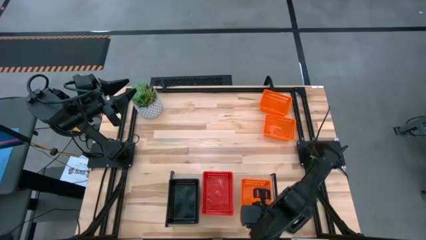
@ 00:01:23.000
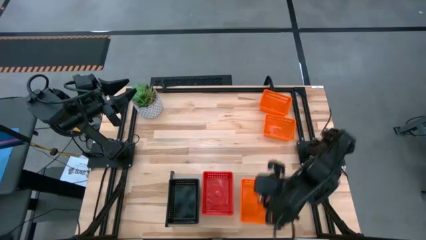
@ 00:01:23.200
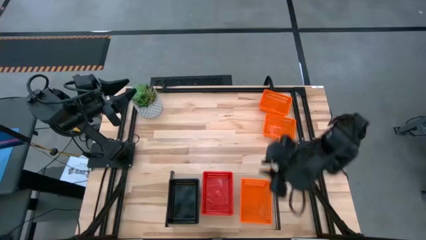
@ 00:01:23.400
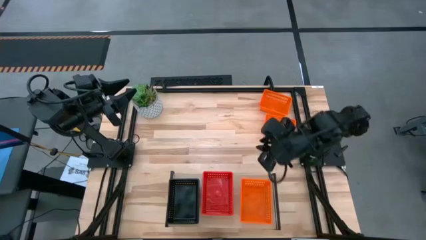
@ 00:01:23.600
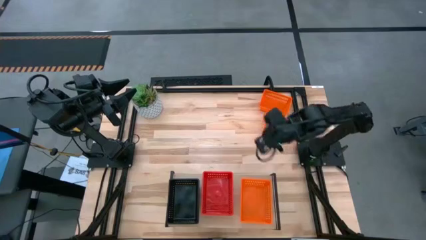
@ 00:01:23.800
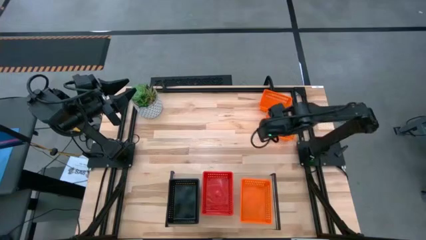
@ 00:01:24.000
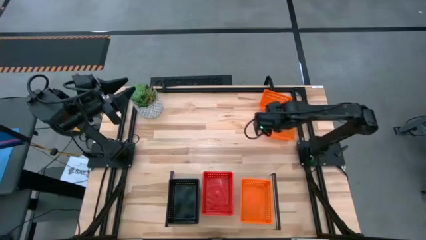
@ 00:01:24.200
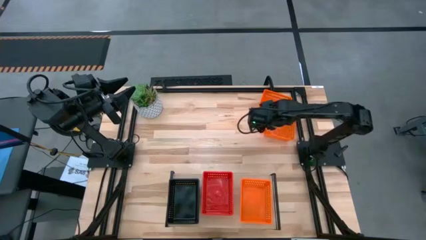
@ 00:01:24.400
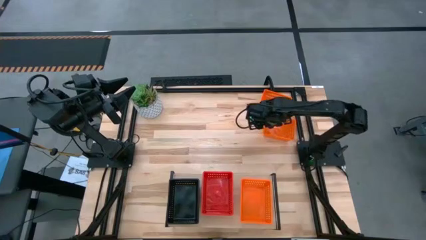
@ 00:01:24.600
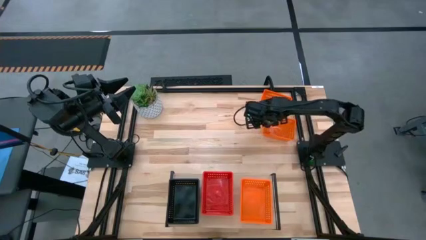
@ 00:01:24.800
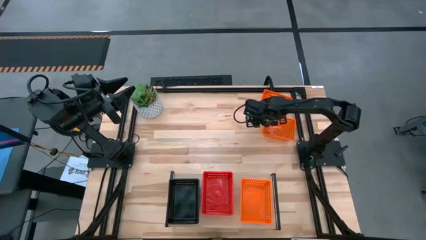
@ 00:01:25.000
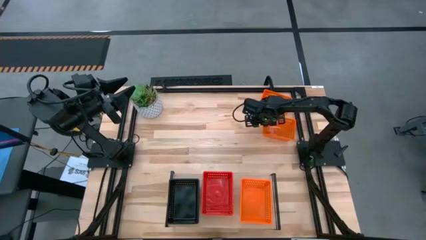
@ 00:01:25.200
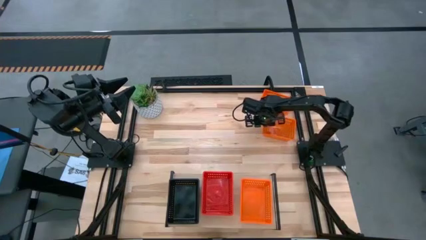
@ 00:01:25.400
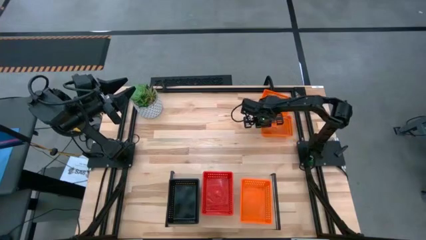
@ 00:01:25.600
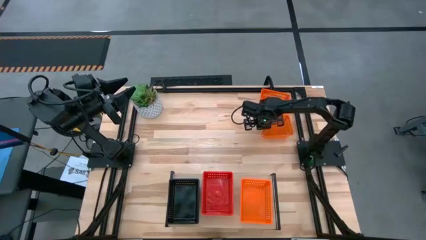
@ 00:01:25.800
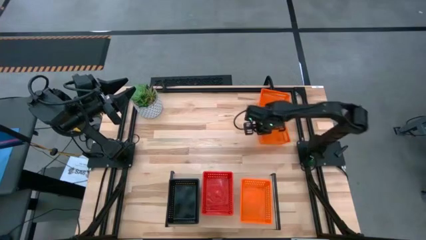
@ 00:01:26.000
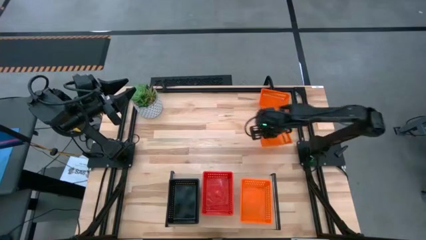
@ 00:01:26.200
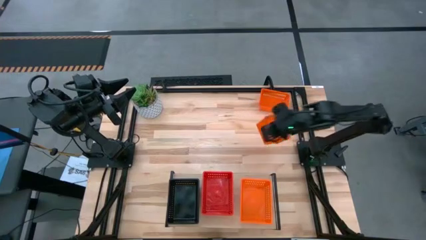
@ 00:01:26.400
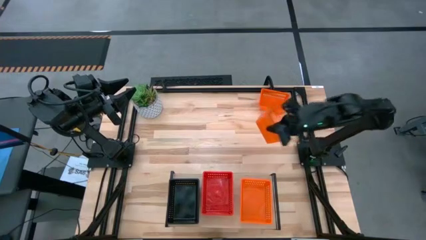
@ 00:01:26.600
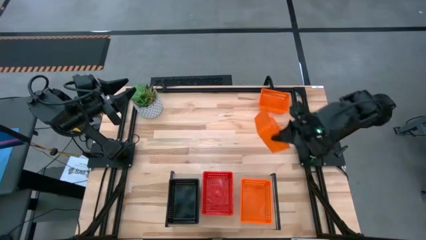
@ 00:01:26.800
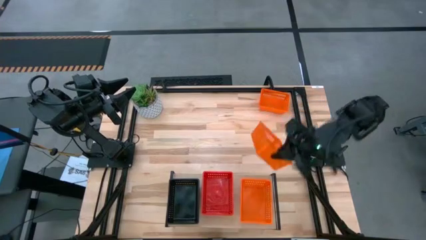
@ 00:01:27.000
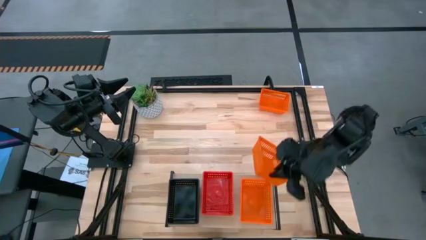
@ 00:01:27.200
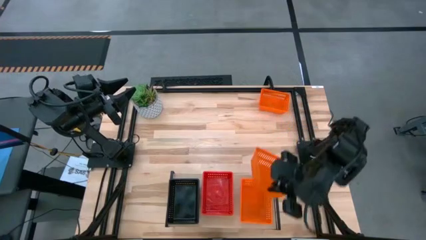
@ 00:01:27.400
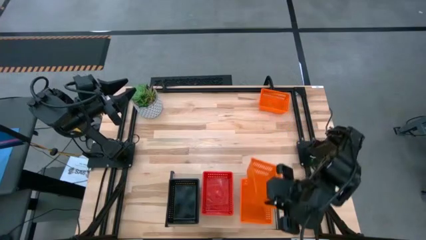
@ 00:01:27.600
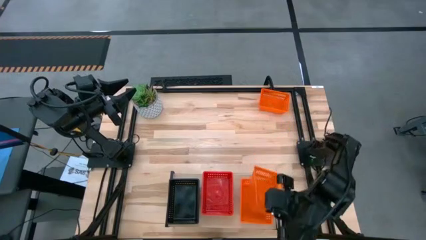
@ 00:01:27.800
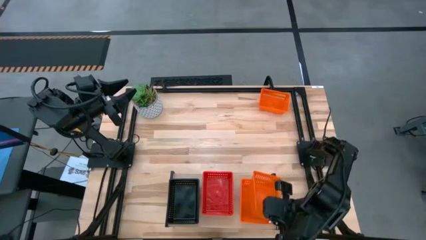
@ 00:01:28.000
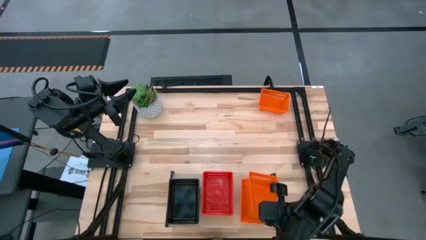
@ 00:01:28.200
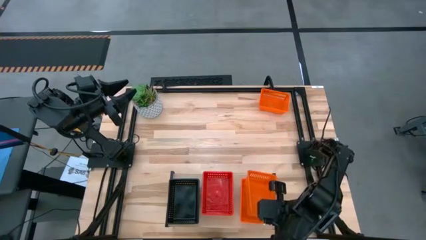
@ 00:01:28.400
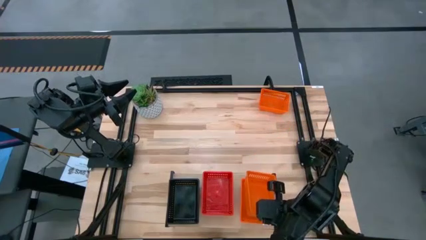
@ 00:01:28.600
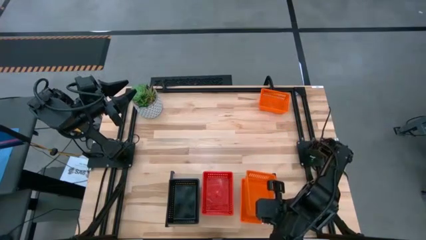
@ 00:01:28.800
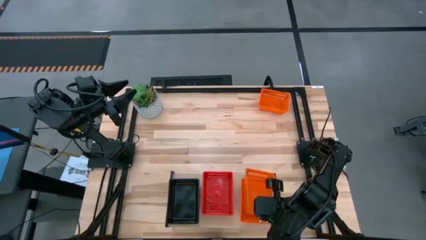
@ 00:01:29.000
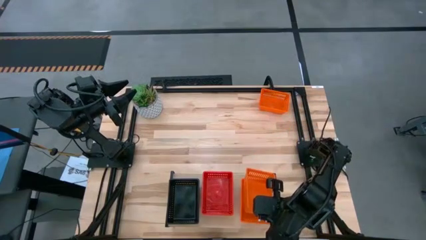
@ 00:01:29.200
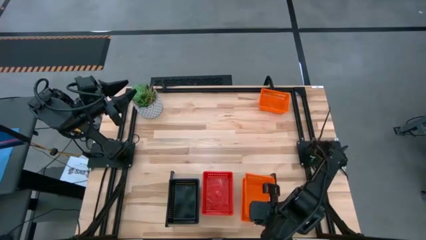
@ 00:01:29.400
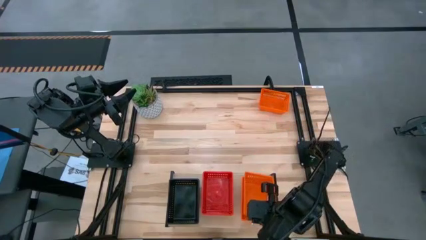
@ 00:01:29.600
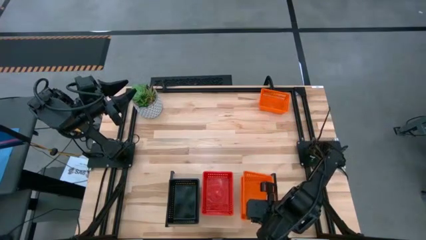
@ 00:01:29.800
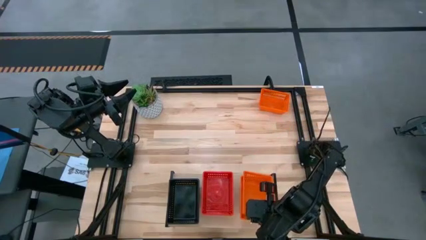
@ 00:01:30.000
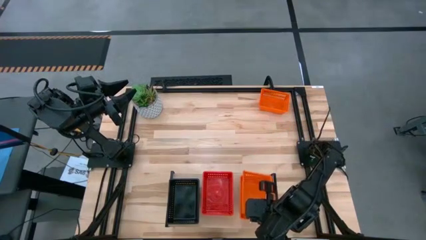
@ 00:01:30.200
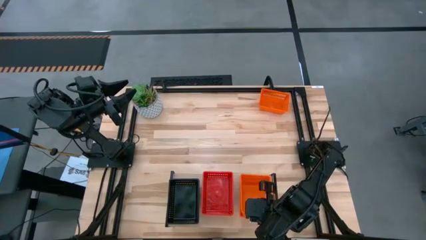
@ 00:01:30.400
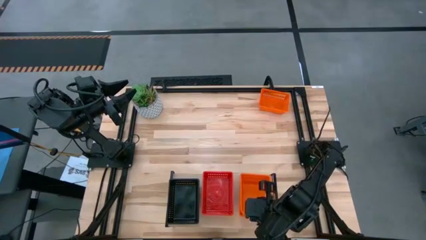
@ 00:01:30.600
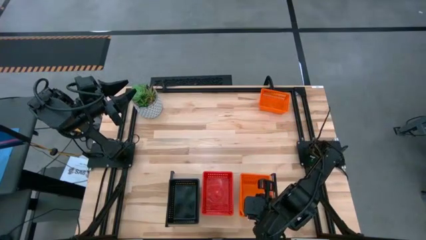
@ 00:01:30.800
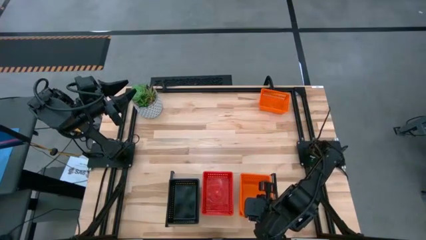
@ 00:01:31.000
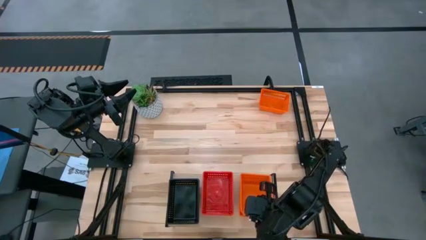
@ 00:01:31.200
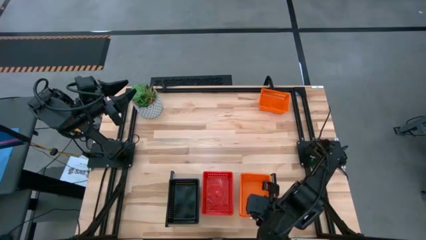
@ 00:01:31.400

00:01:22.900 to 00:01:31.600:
Task: Stack baskets on shelf by color
Stack the bottom orange bin on the top of the orange bin on the shelf

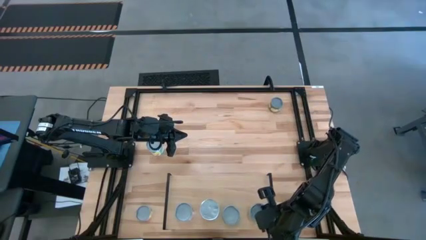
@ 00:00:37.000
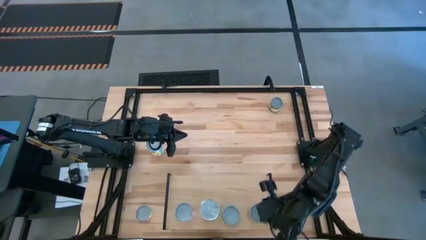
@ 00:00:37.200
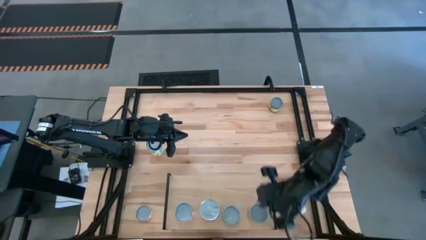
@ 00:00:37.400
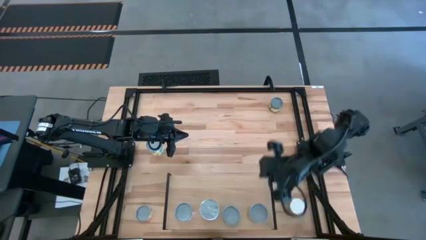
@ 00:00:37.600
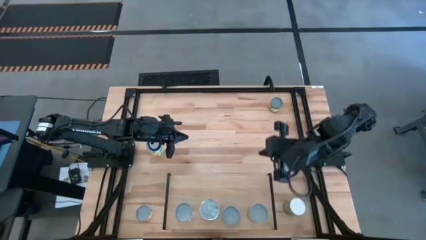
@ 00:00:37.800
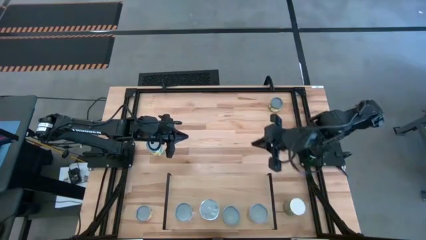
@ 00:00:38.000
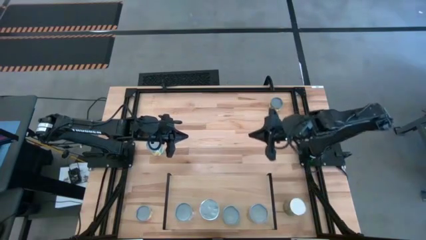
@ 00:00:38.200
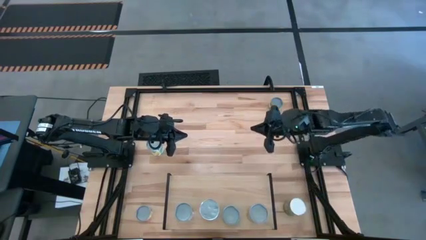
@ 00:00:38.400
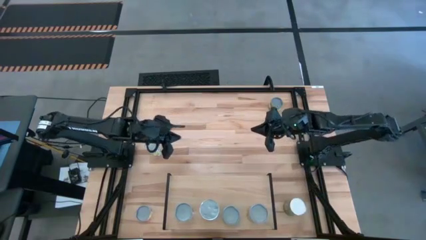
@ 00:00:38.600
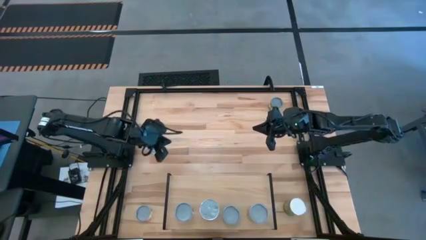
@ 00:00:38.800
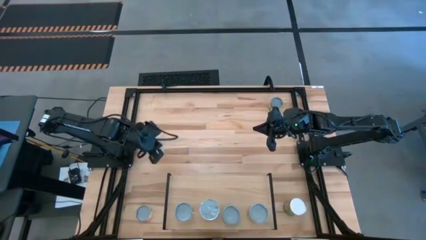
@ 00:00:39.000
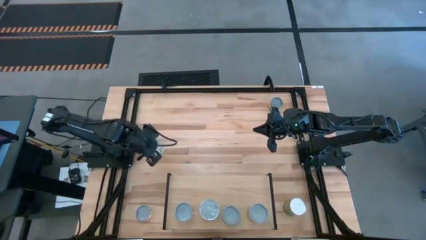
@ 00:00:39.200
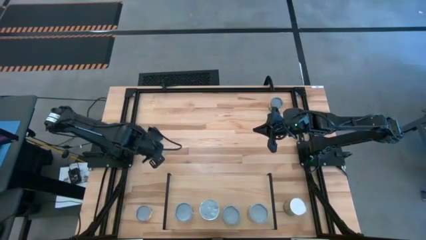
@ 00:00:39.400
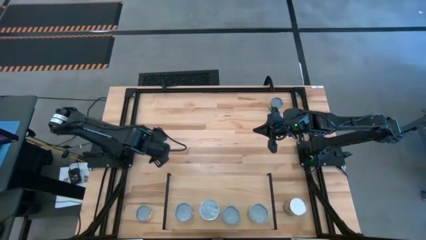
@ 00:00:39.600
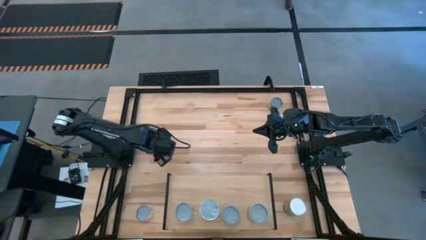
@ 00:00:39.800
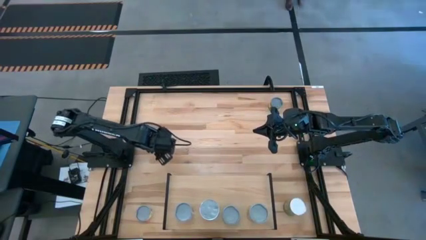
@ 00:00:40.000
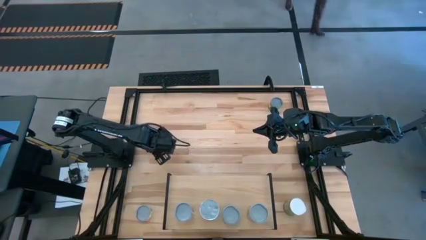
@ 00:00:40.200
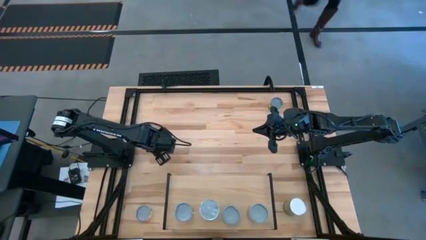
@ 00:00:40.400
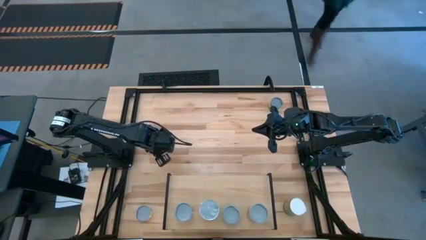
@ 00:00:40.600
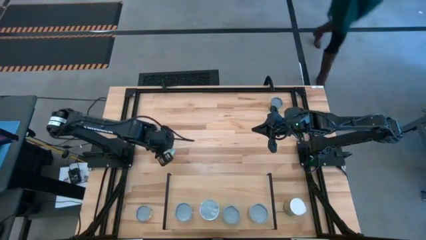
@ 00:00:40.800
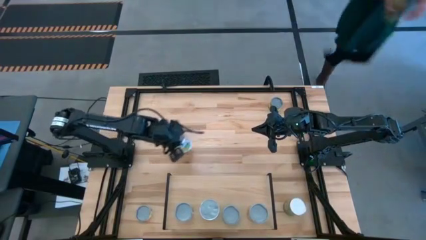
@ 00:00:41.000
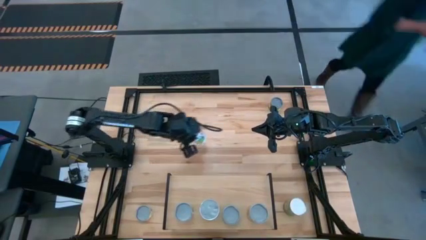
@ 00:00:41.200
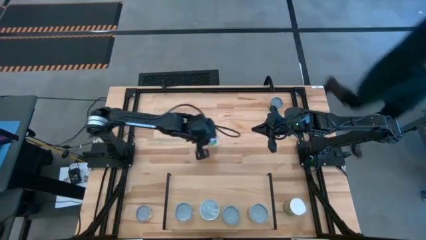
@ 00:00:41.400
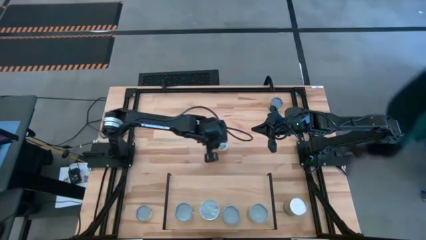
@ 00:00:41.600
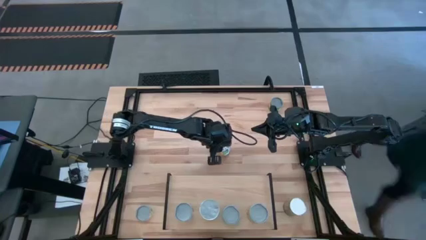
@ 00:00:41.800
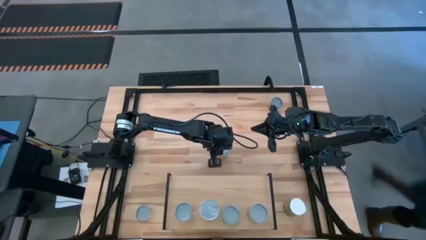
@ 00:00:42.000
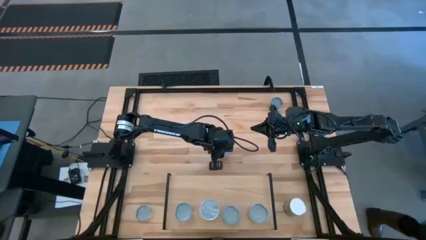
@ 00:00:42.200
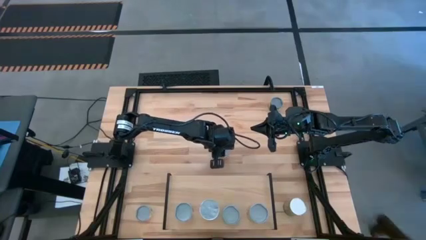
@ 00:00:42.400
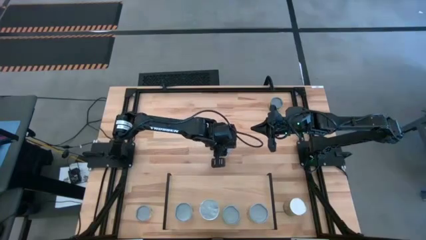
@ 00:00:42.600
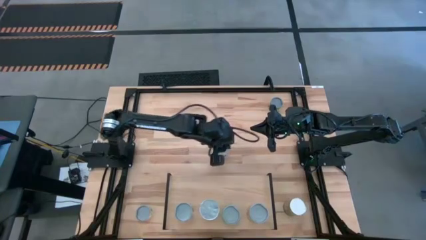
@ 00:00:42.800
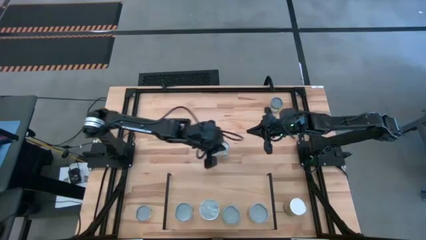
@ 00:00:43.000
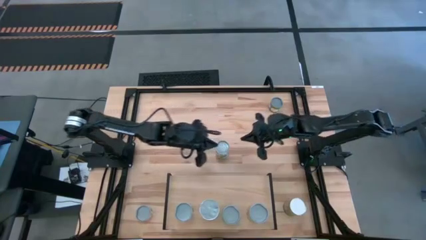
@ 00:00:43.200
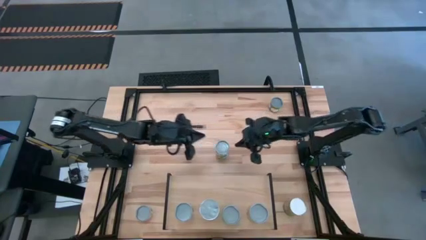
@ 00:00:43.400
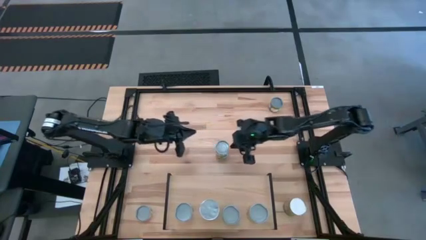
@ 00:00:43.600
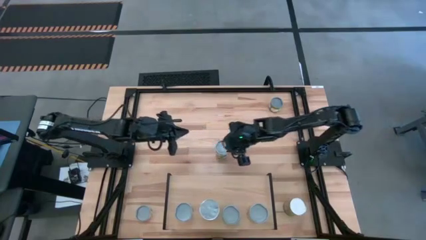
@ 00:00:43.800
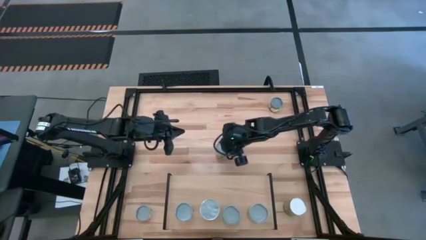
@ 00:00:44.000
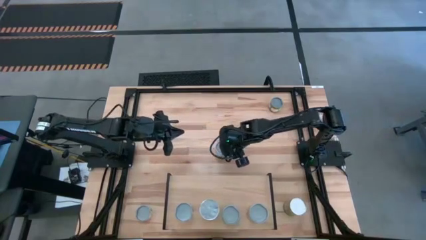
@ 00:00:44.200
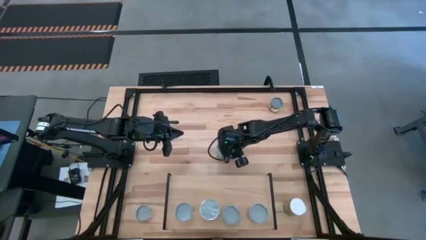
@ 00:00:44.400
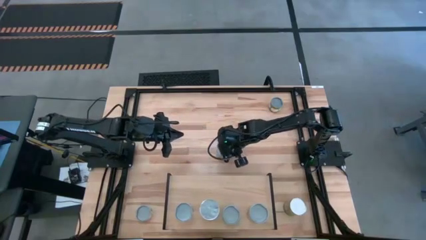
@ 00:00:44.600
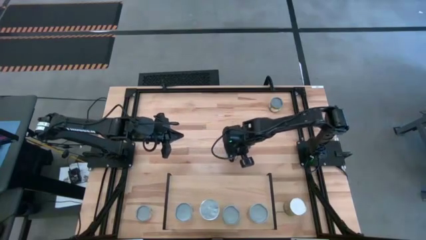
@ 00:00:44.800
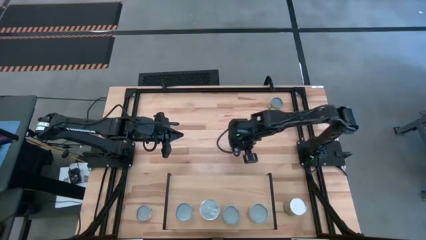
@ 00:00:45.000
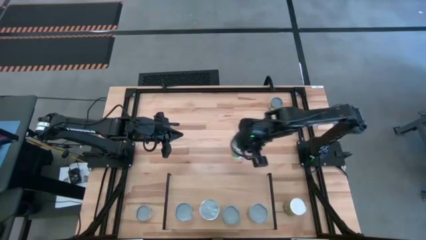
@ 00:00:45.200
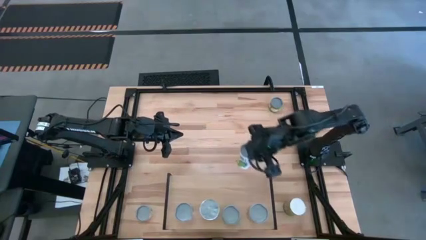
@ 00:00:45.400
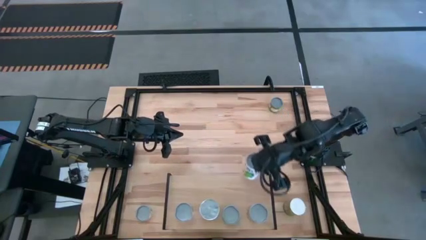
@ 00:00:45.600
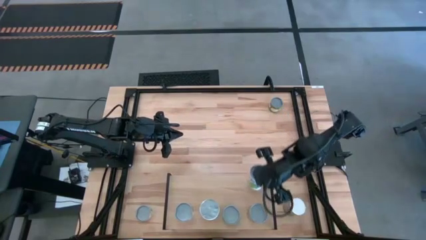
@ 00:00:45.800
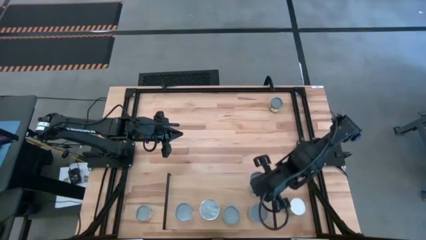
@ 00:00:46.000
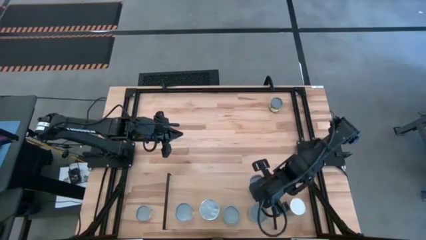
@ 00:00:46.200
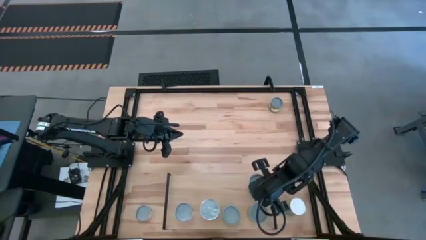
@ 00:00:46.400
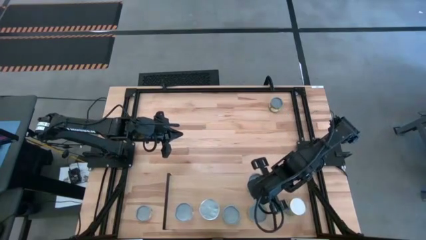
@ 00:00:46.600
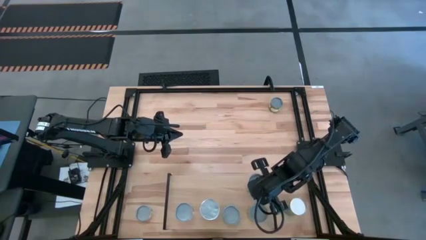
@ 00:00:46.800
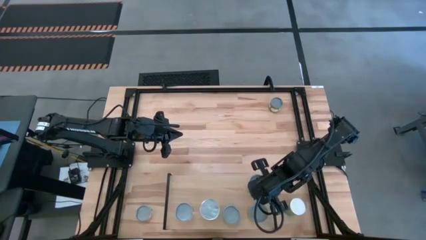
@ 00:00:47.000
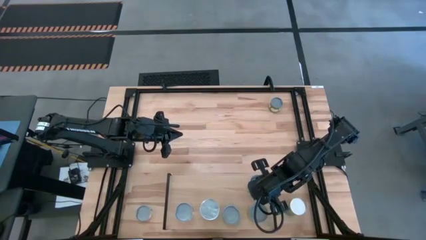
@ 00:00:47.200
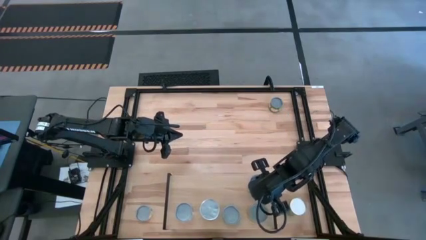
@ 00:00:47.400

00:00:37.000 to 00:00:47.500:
Task: Pick and place cans onto a shelf
Put the canned mixed fruits on the shelf
